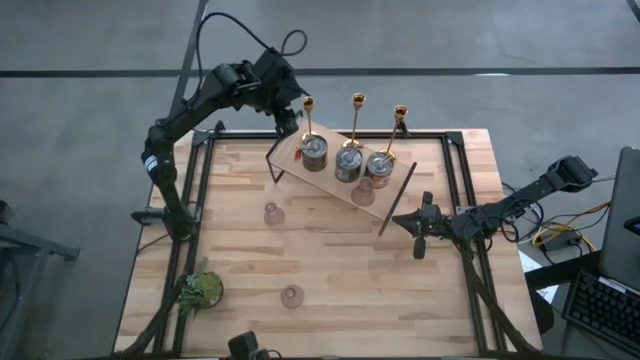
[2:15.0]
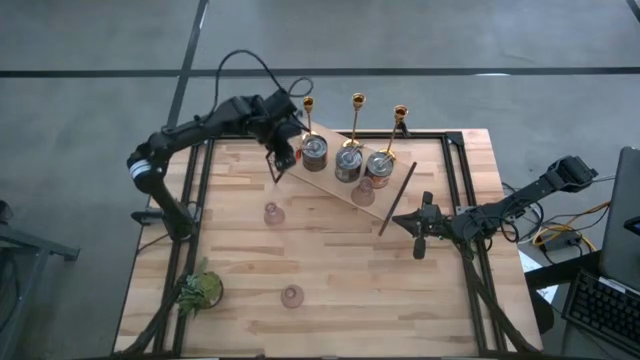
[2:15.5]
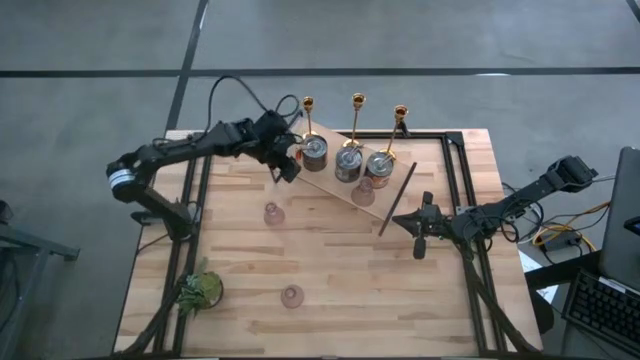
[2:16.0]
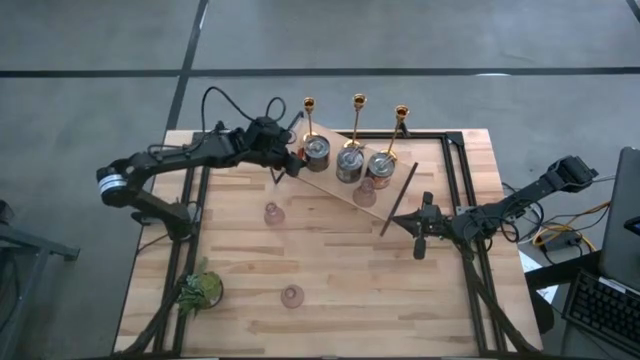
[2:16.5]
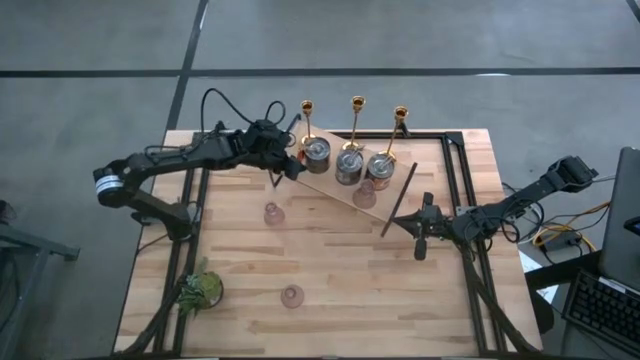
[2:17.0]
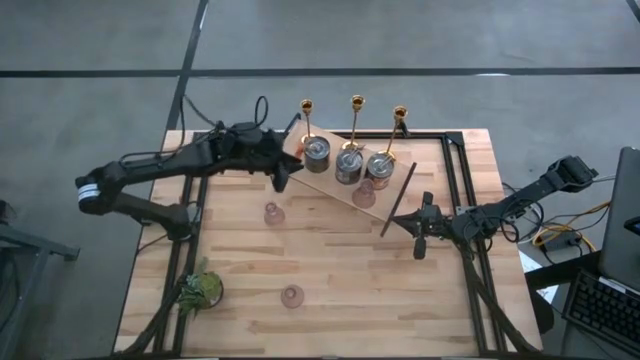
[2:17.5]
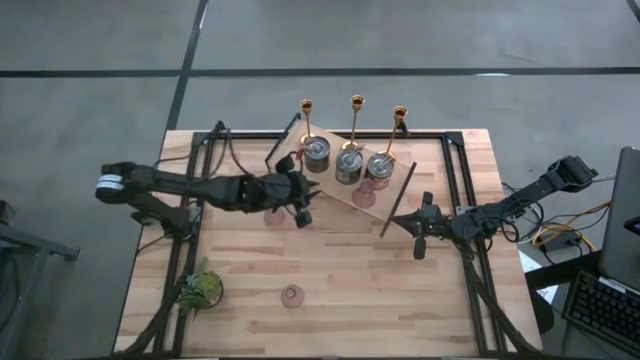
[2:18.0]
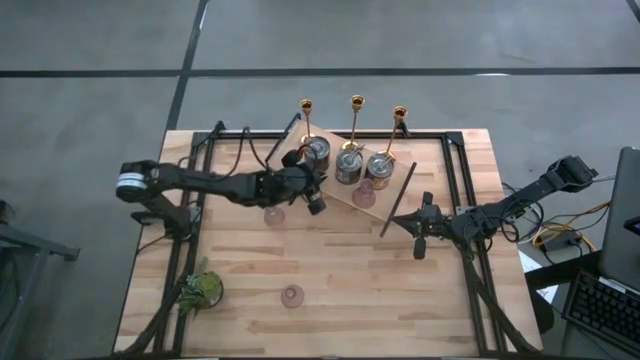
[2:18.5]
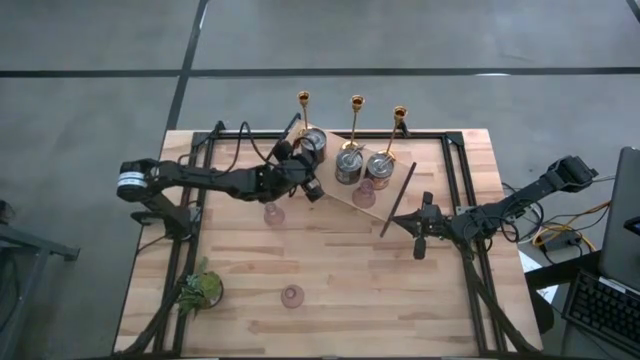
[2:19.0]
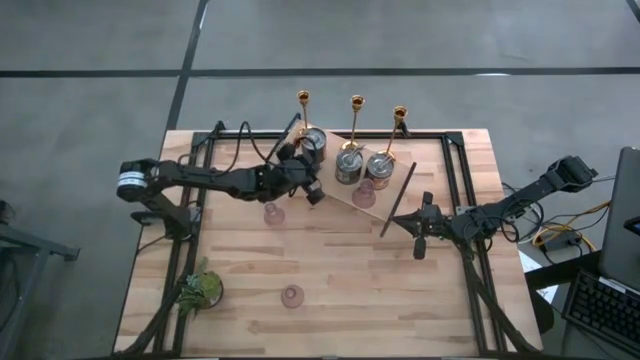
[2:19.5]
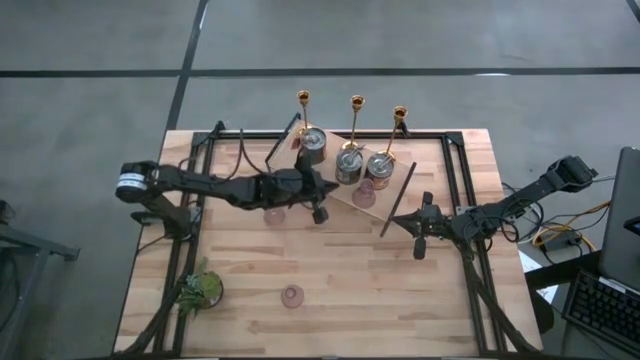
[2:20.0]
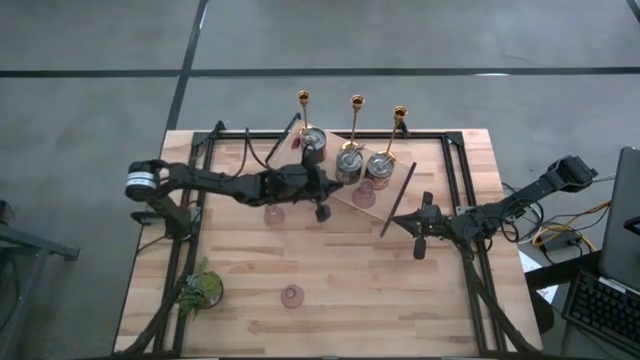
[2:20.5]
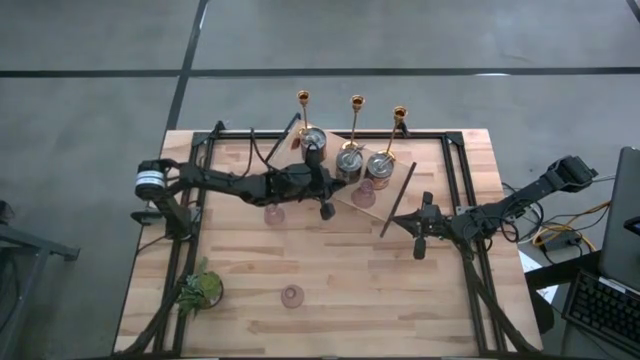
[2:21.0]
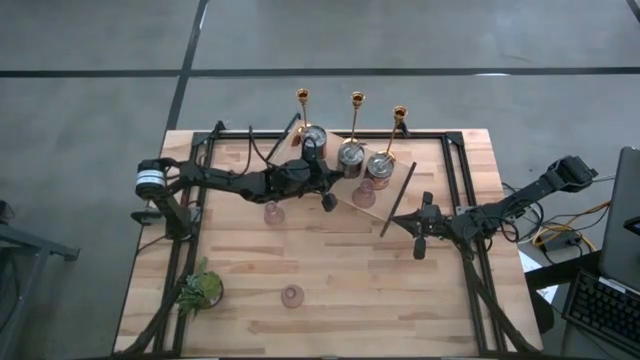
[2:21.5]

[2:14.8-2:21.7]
Task: Pick & Place candle stick holders
Adjust the scented candles on the shelf

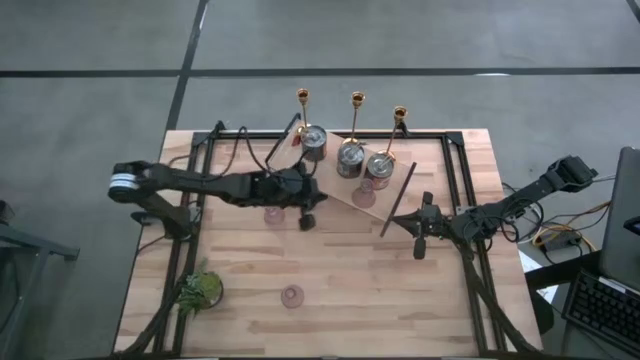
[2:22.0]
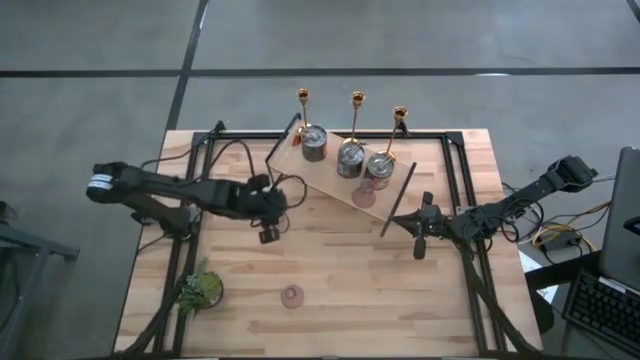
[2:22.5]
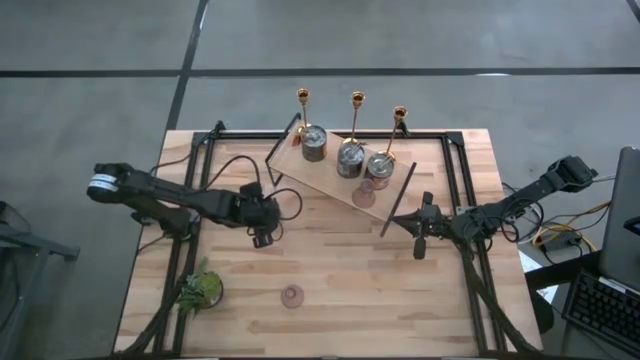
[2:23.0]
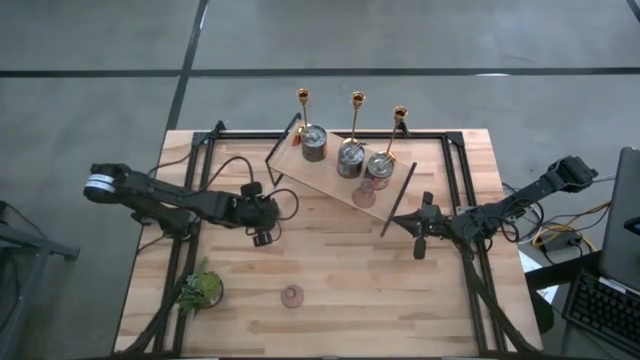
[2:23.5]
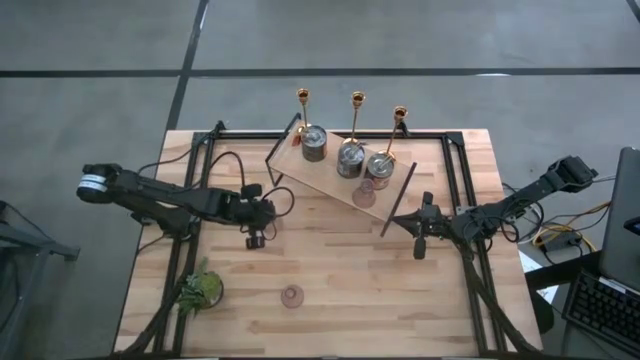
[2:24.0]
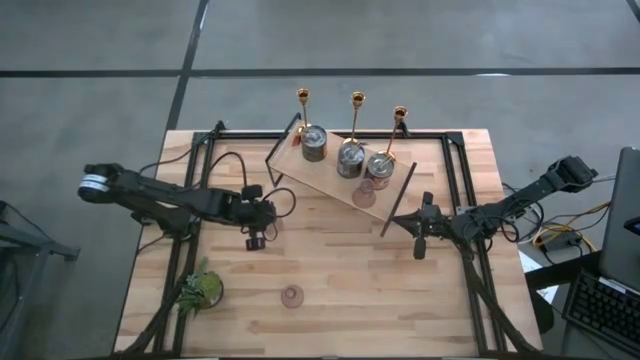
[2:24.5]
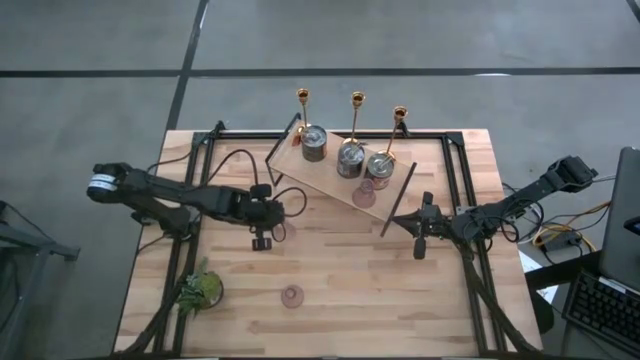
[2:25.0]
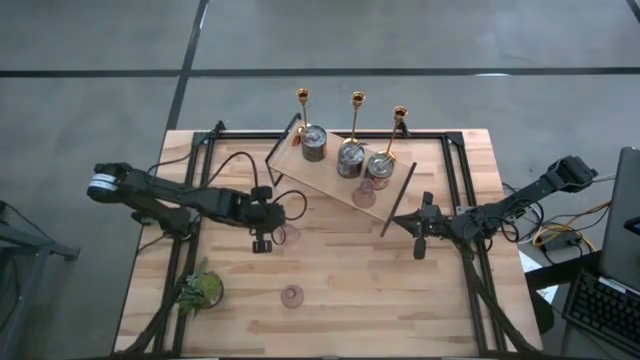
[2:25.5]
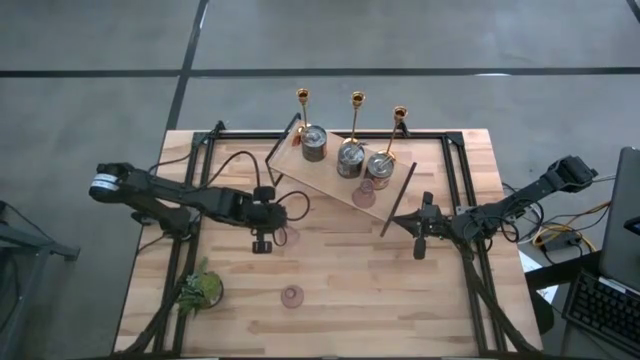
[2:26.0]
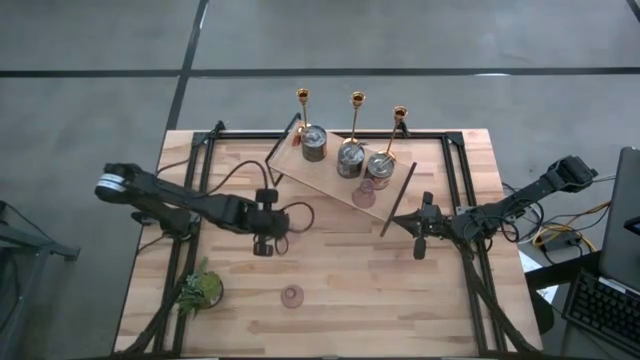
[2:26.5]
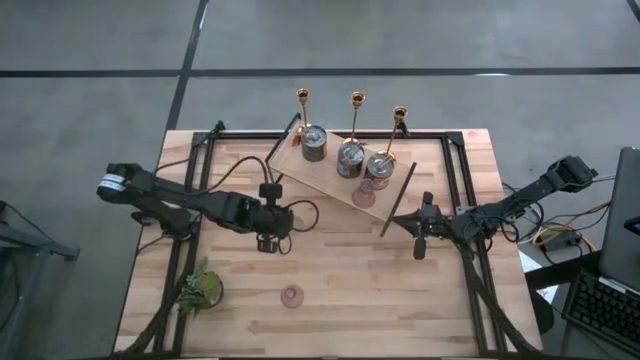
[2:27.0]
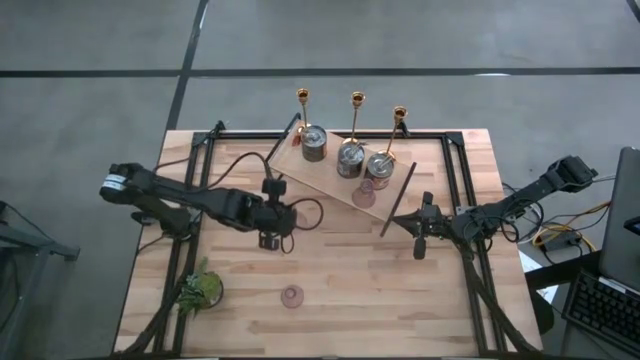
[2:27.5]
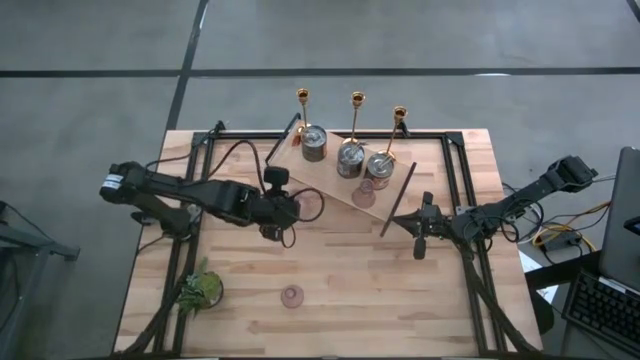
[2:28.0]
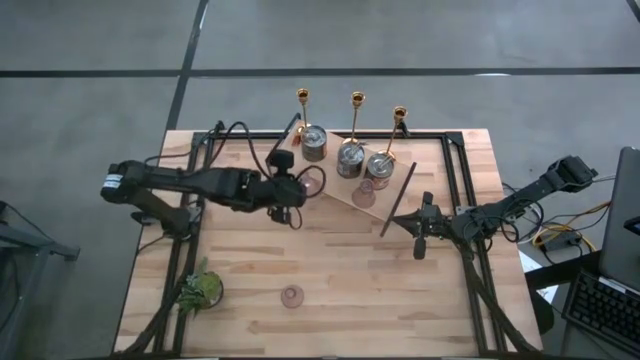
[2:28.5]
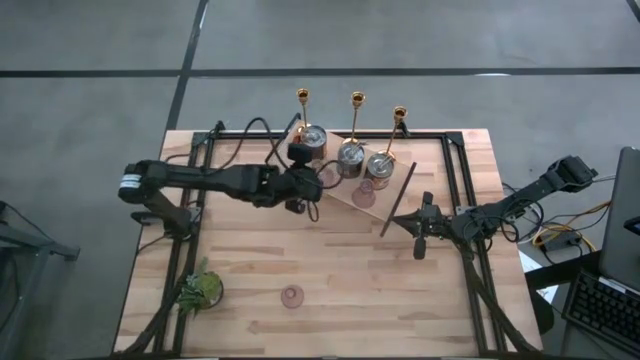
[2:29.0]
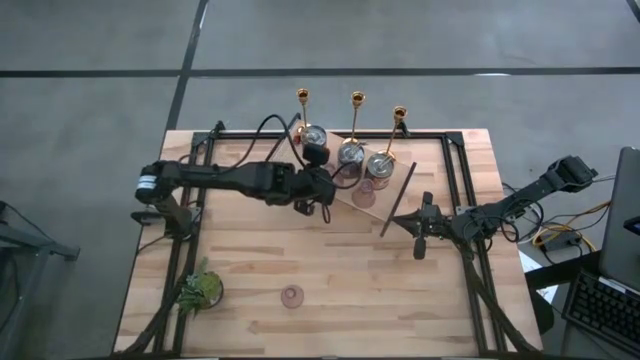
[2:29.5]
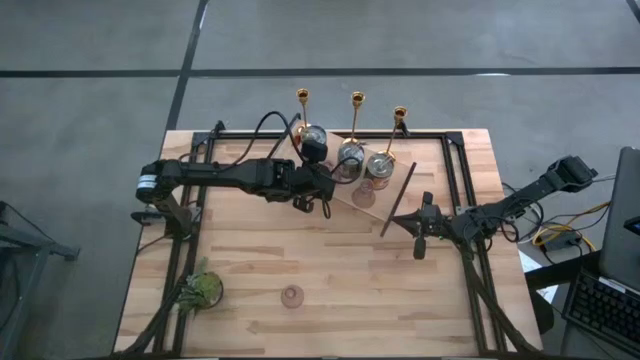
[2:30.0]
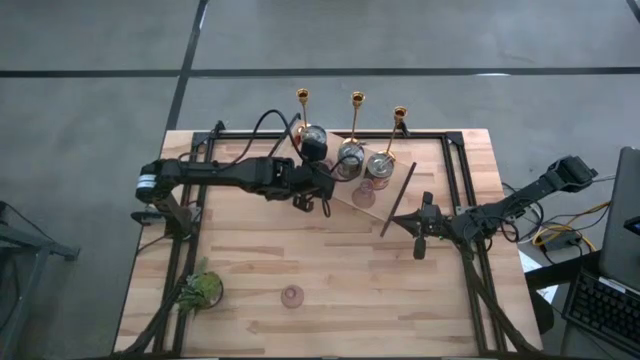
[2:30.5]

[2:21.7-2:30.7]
Put the top pink glass candle holder on the shelf aligned with the other pink glass candle holder

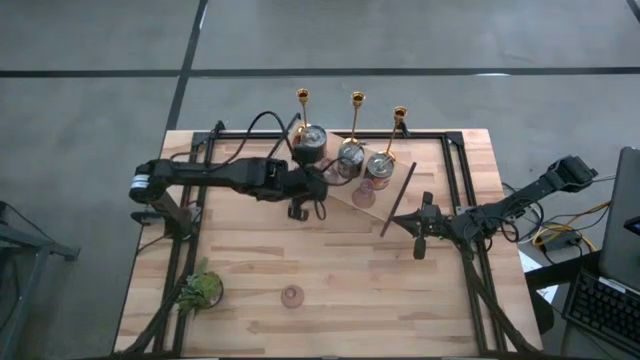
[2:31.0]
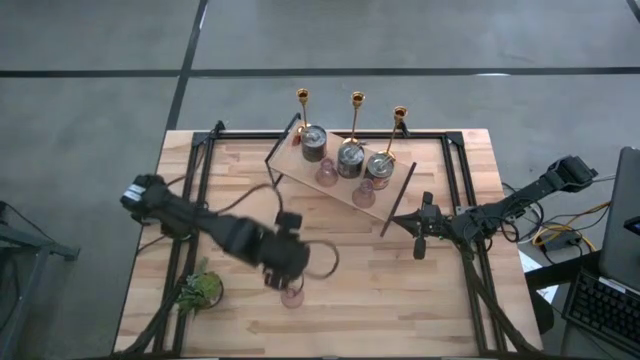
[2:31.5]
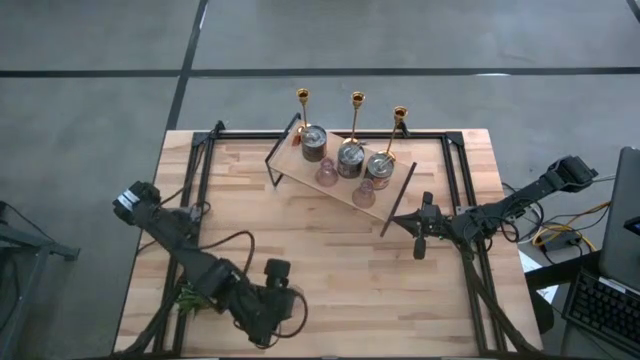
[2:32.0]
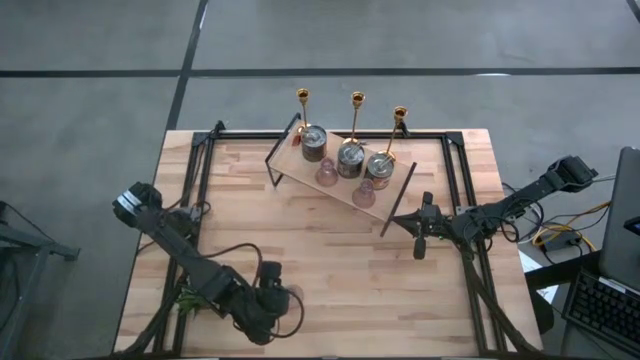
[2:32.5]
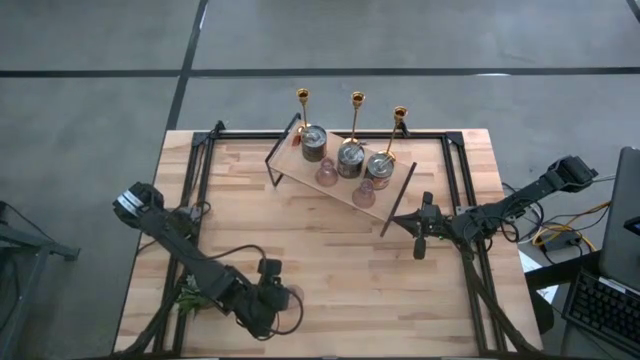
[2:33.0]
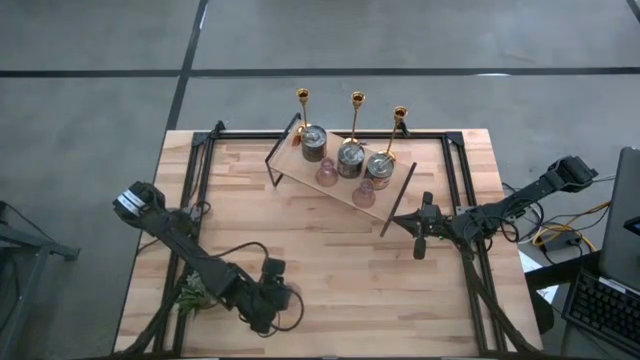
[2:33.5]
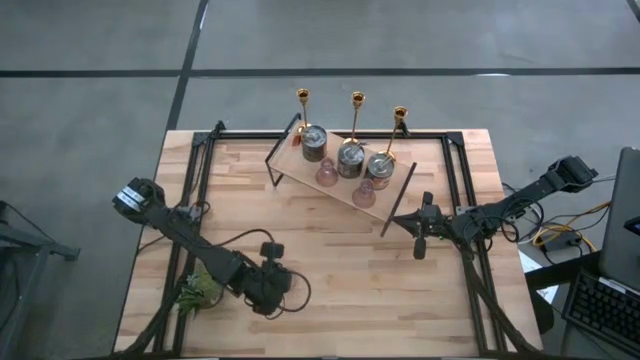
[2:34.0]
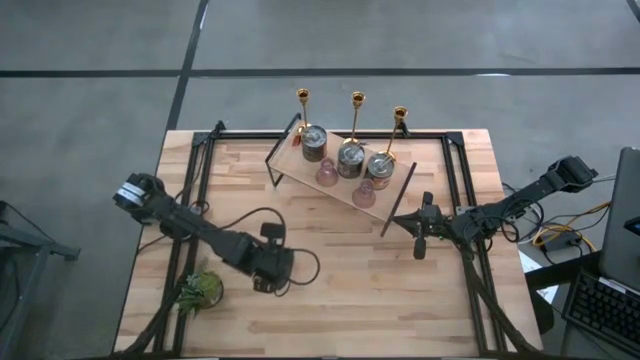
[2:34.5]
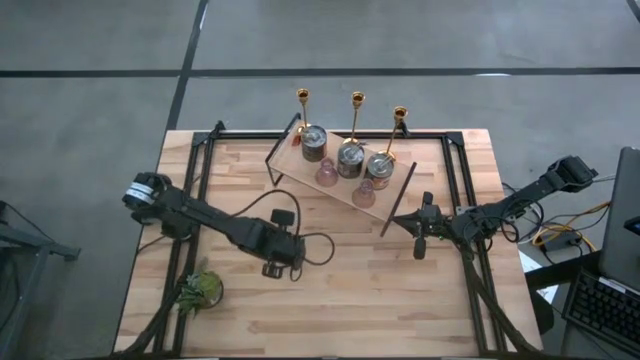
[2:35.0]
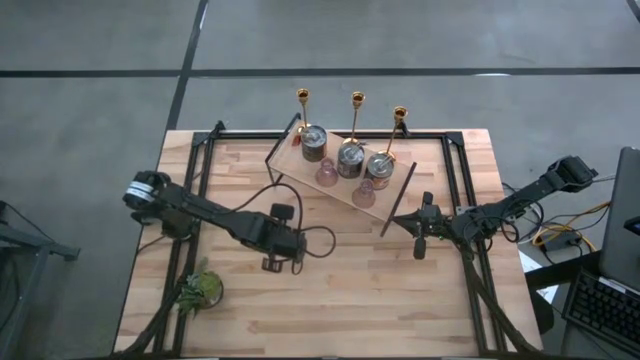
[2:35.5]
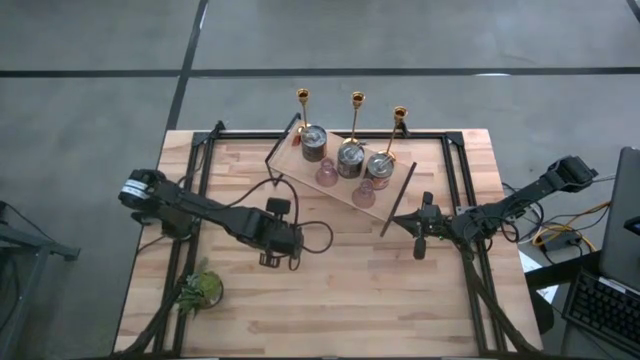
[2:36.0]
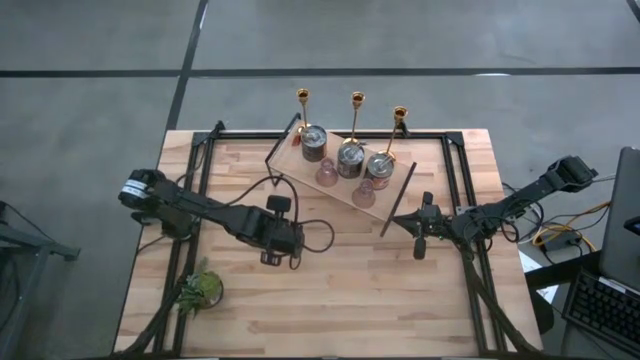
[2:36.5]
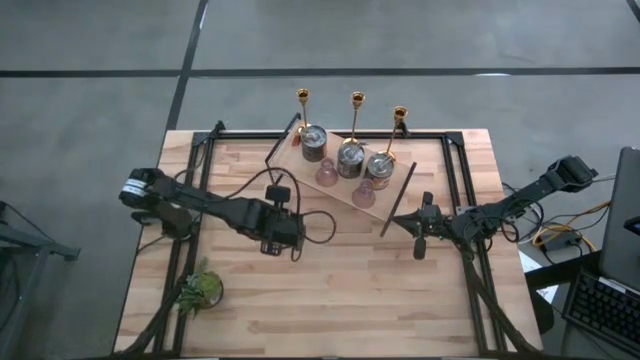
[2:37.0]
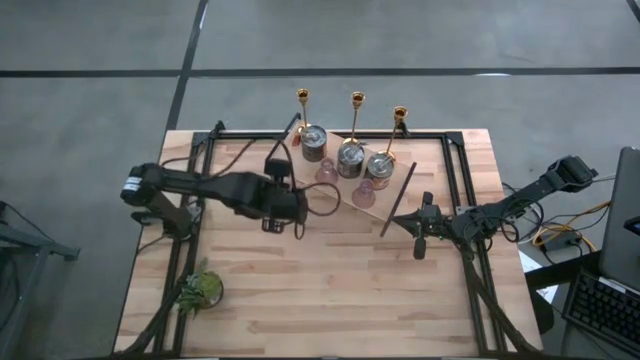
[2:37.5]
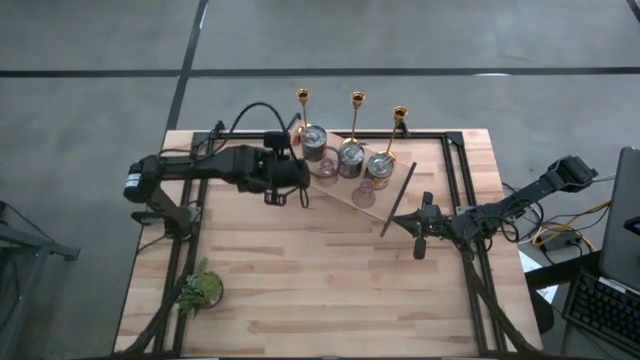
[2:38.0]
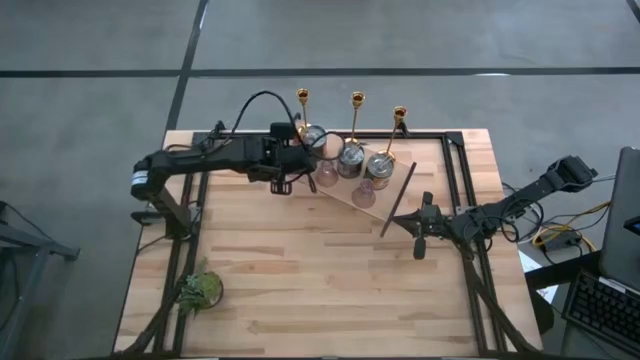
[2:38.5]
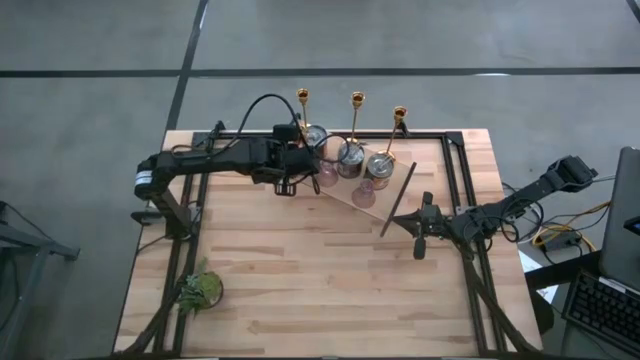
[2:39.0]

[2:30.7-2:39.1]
Put the pink glass candle holder on the shelf aligned with the other pink glass candle holders
